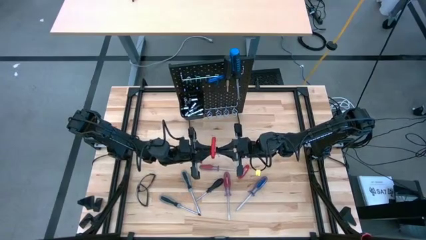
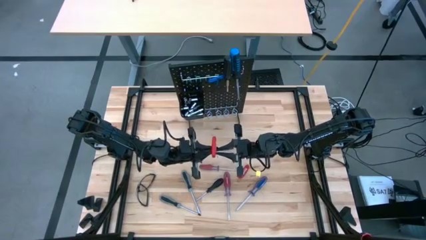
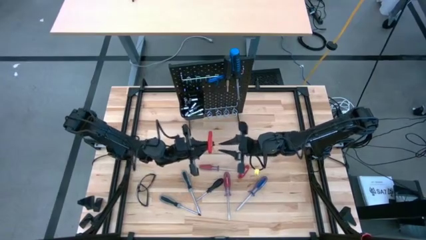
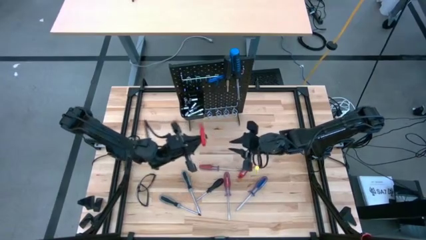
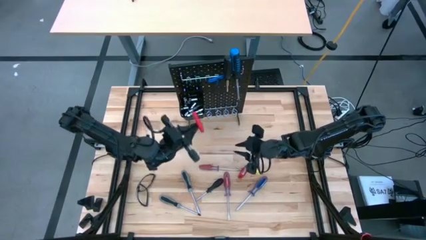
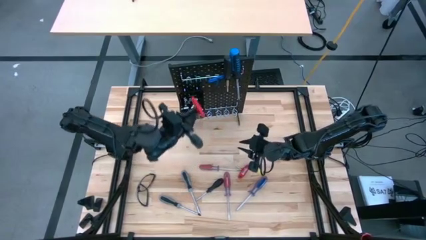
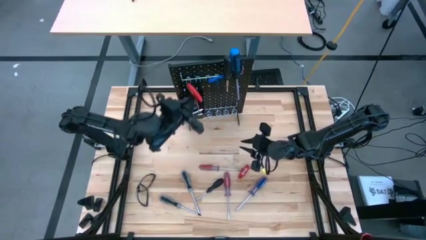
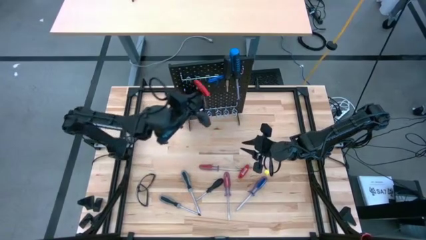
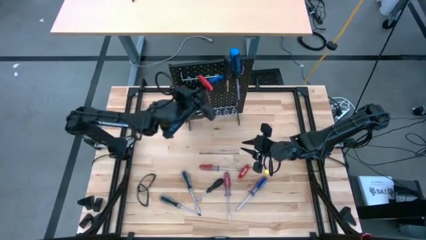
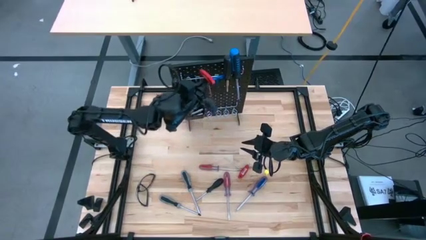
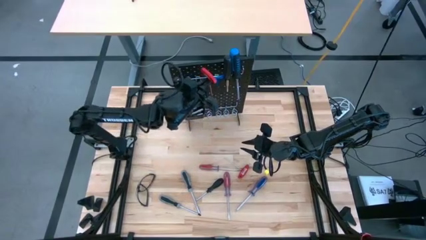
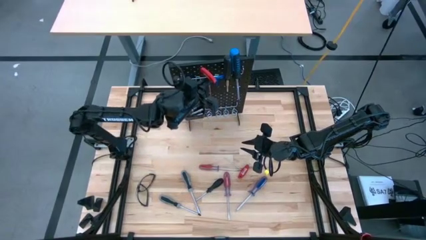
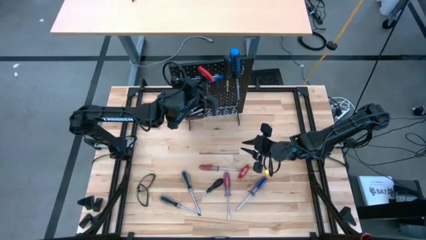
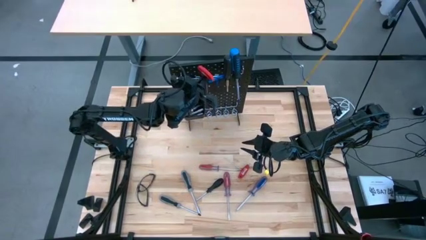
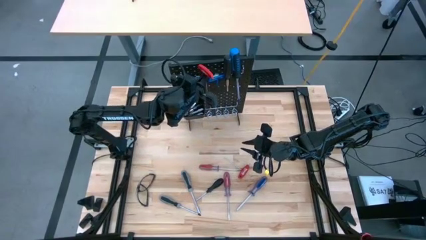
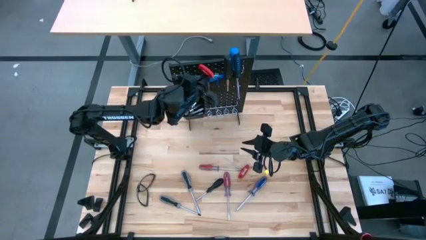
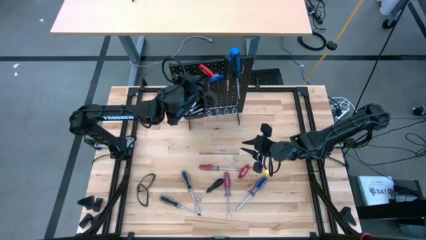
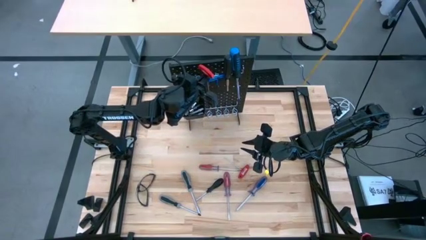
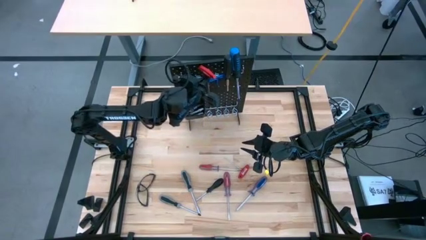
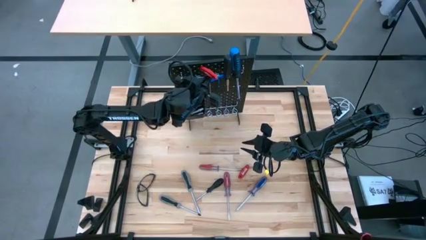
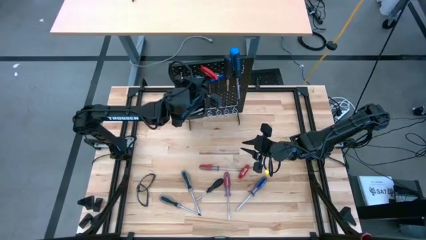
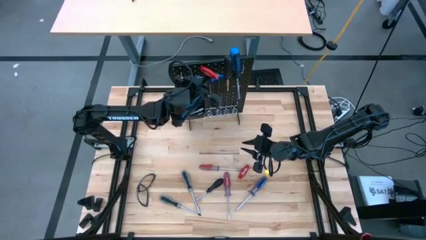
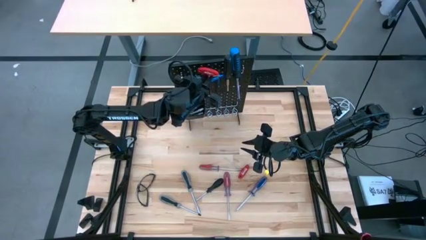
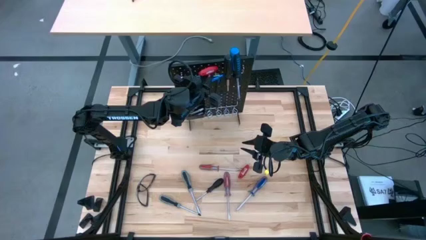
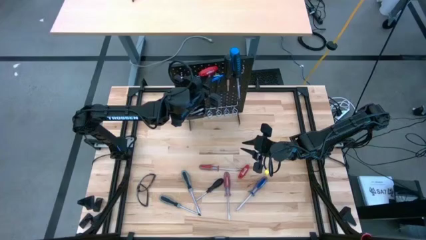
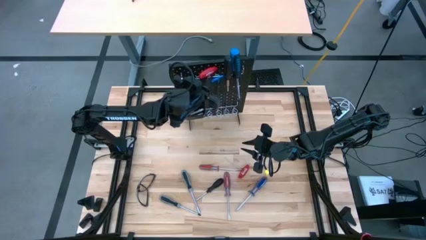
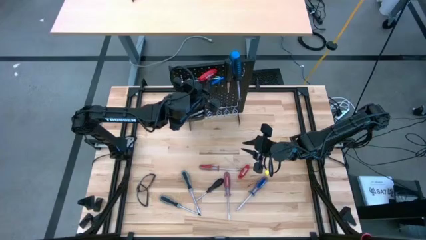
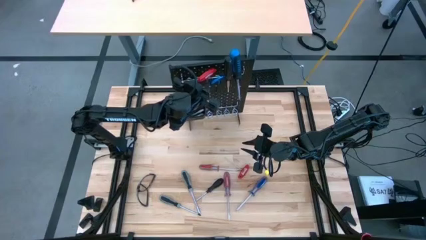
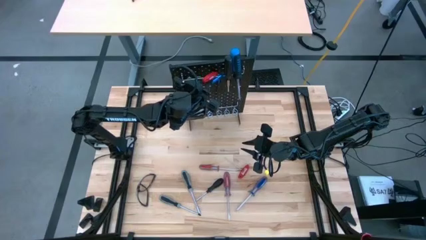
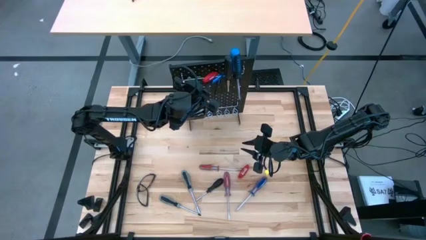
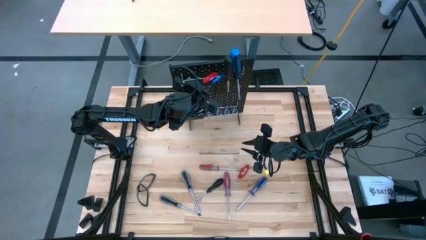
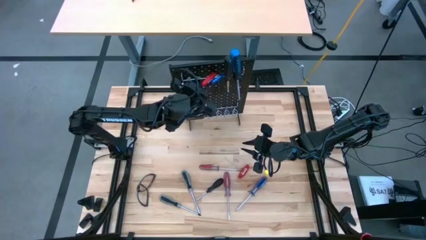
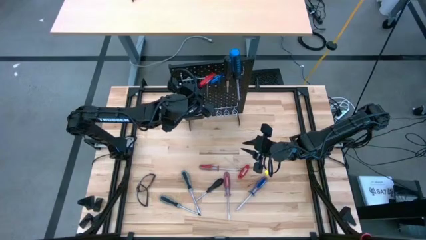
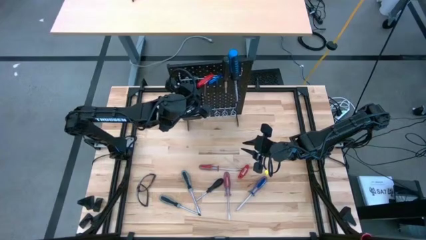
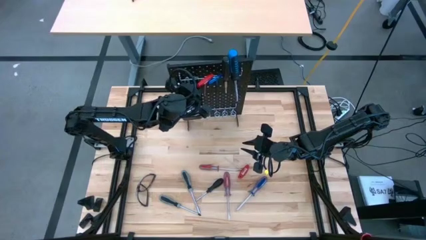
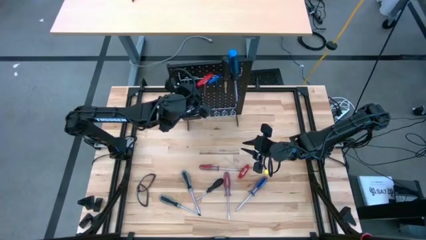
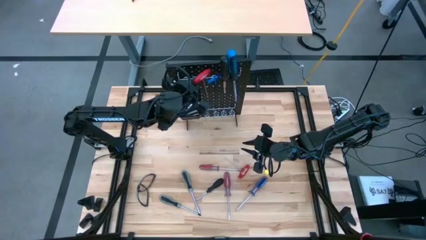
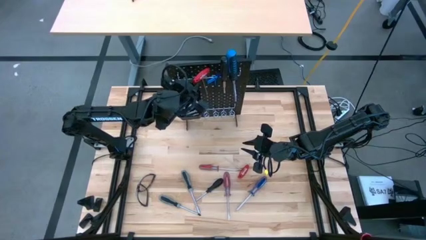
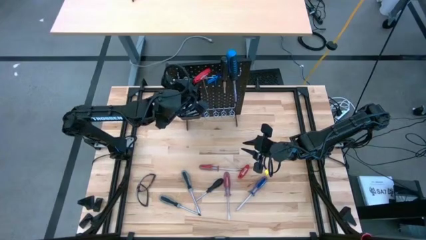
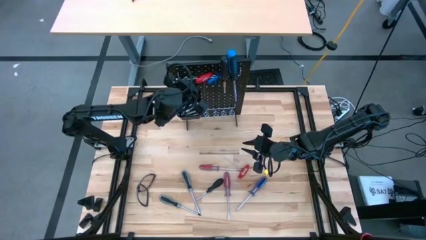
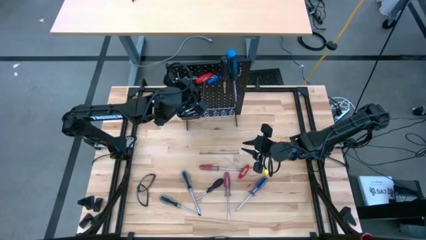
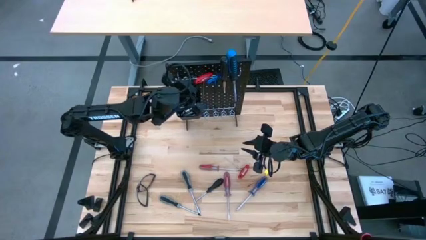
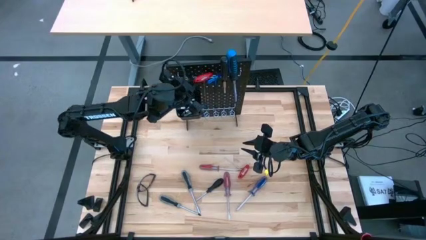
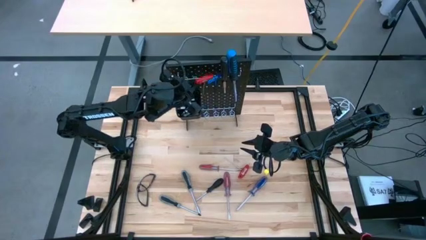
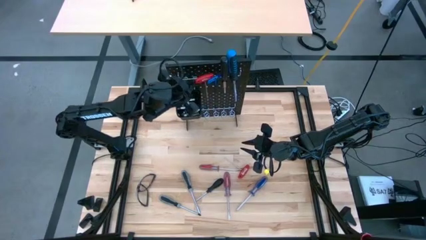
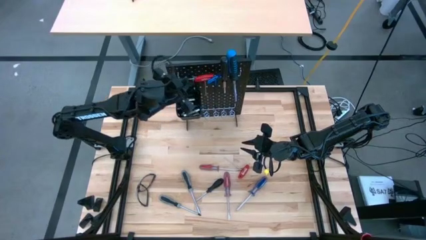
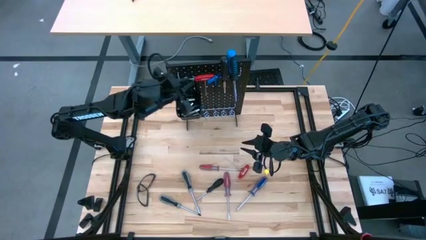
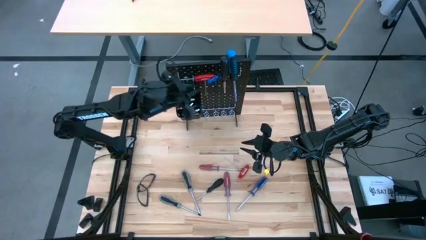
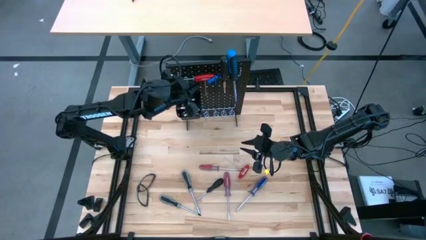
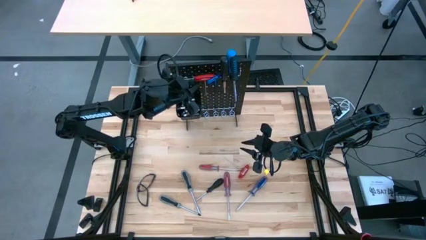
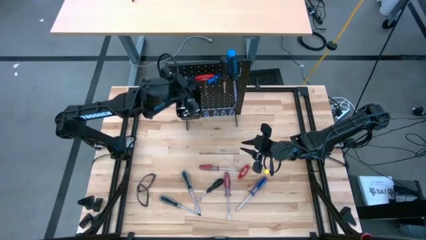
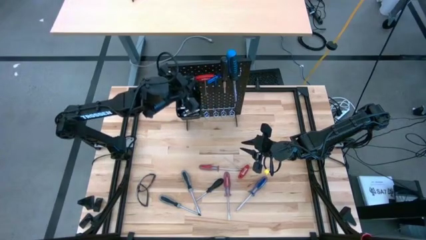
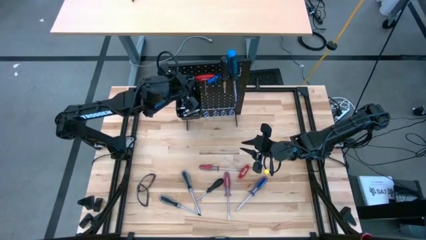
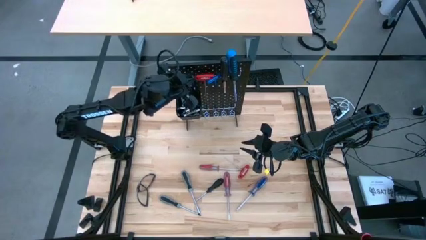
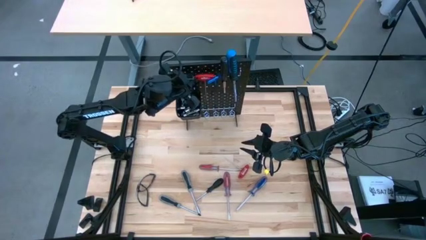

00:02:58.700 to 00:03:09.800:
Task: Hang tools onto peg board
Hang the red allen wrench on the pegboard

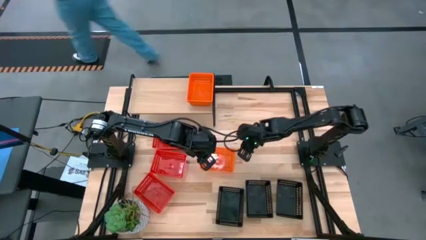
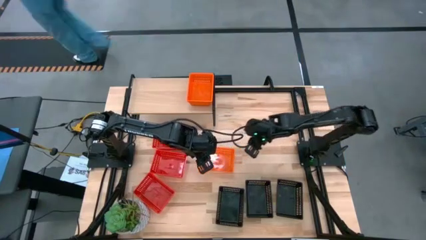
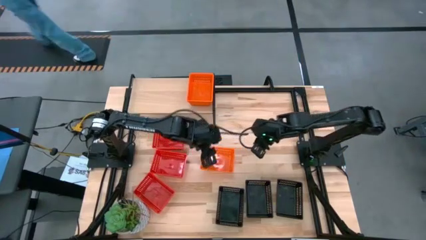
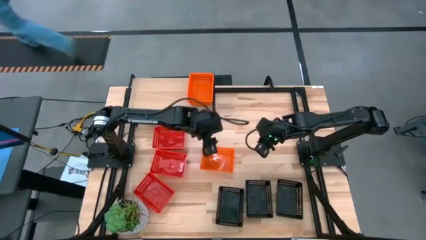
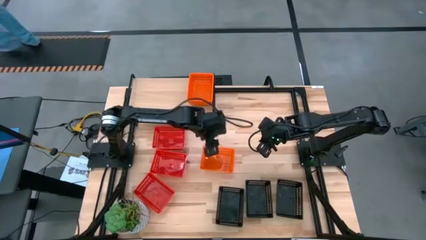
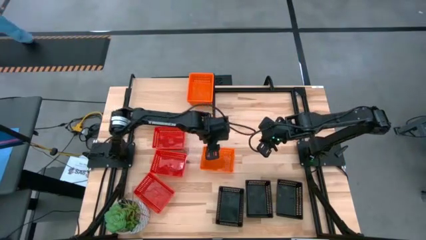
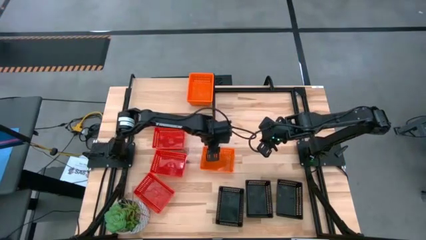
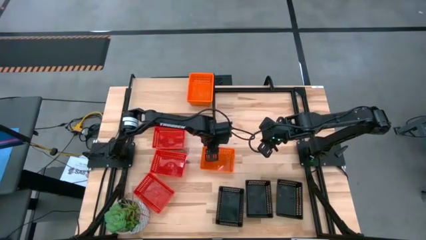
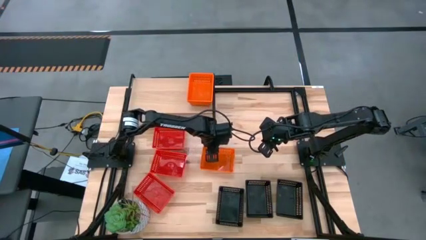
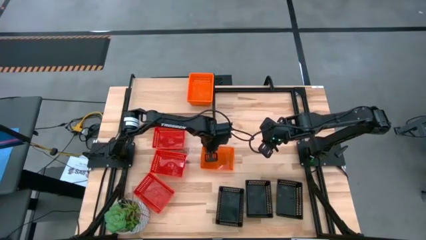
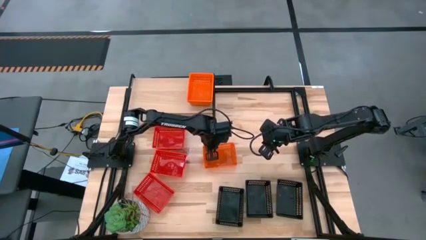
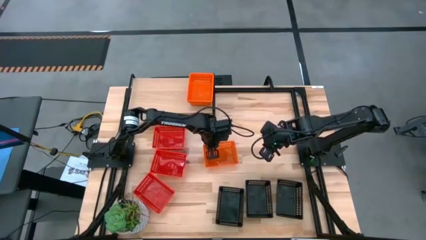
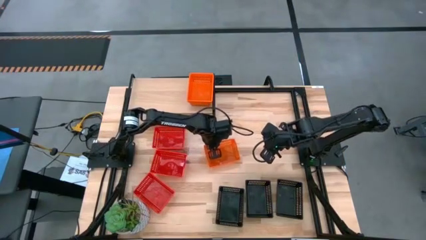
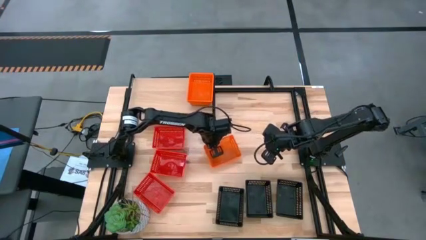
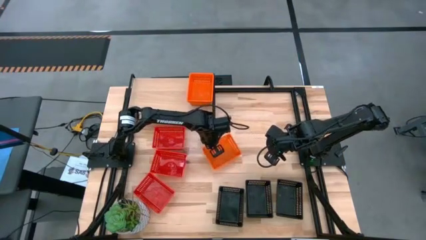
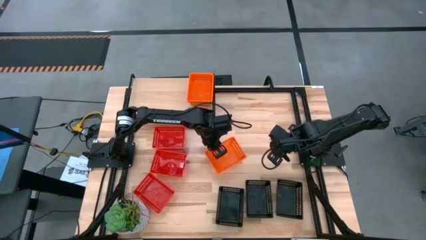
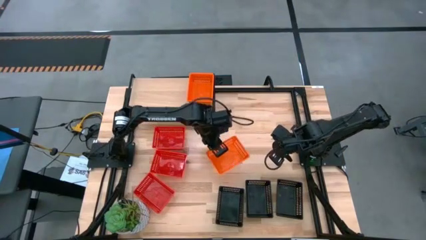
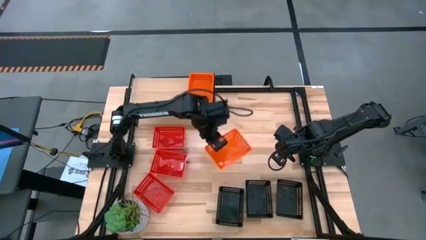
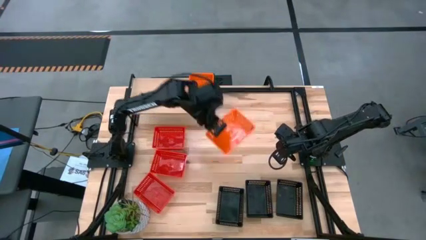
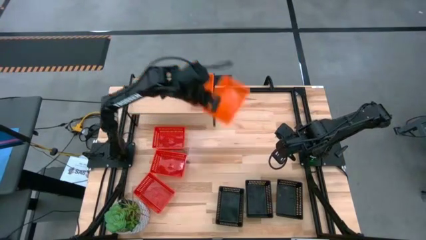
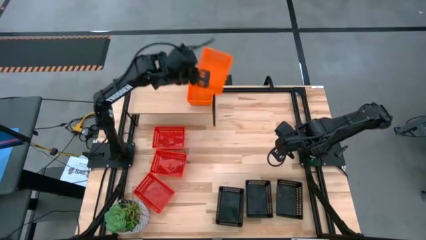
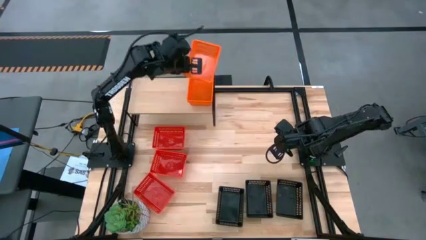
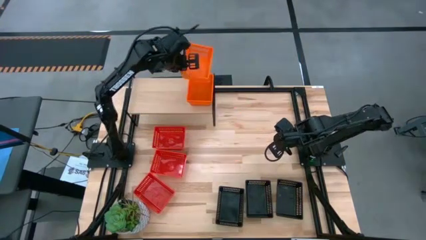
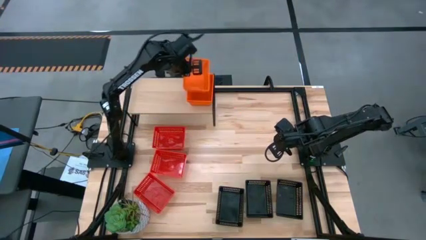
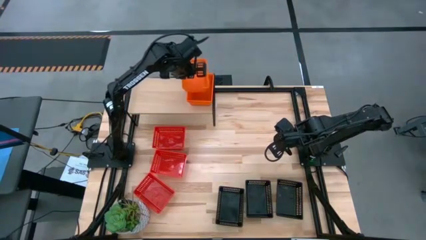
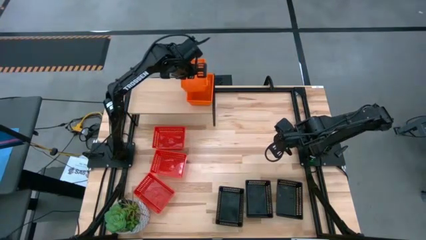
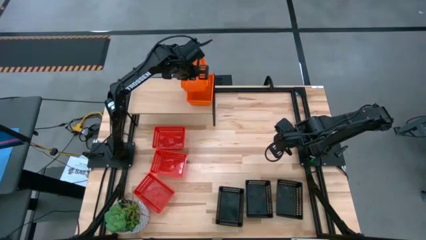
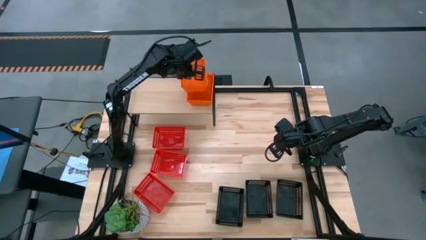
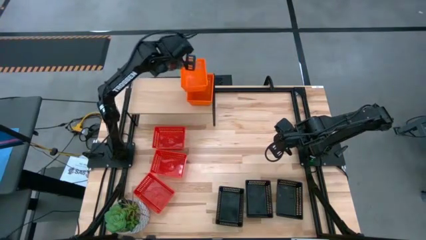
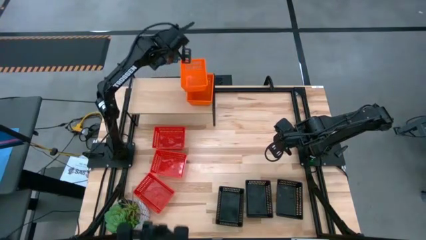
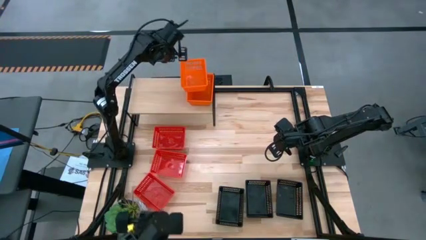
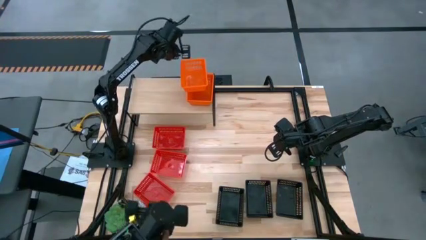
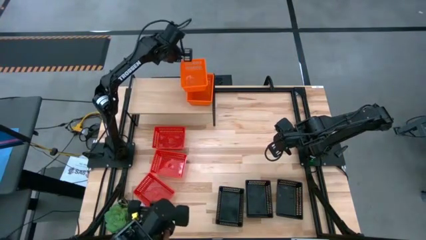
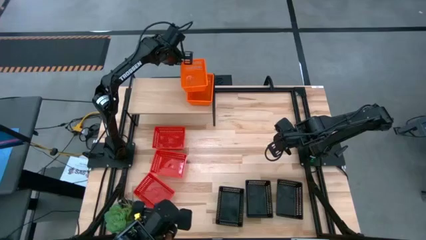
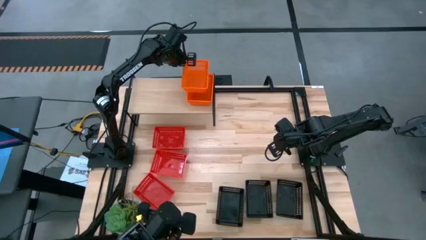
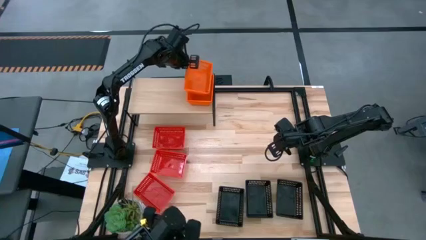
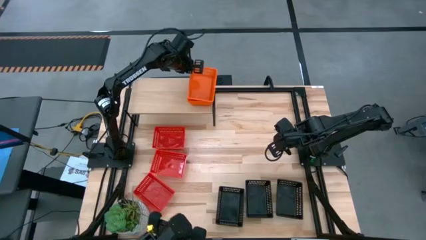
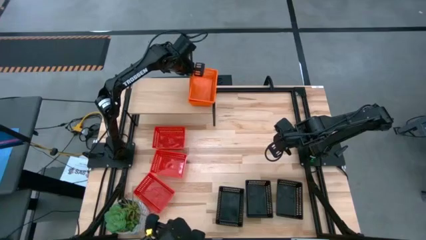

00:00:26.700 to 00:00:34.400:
Task: Stack baskets on shelf by color
Stack the orange bin on top of the other orange bins on the shelf
